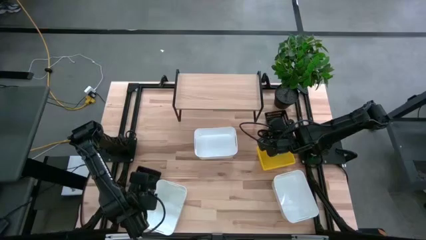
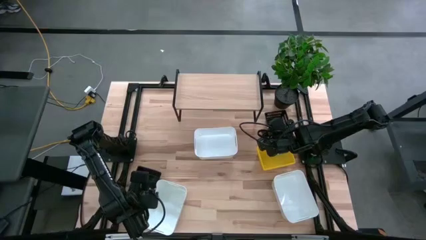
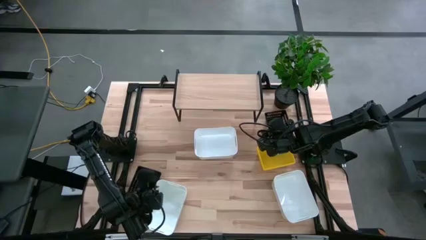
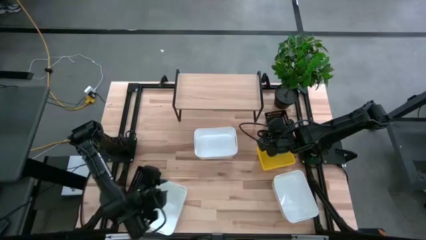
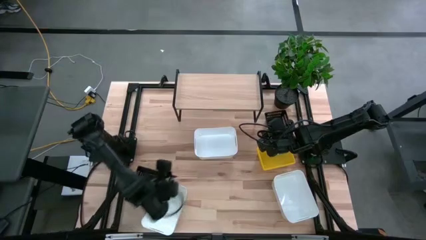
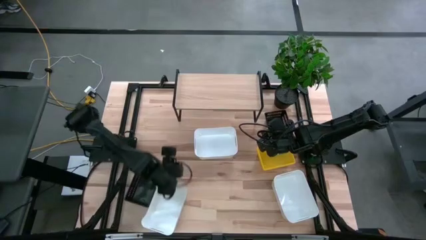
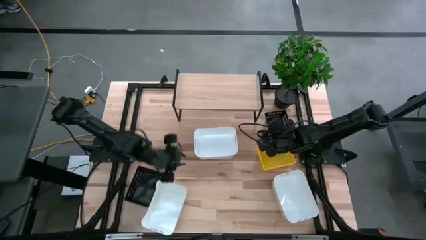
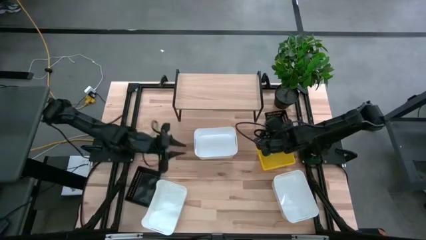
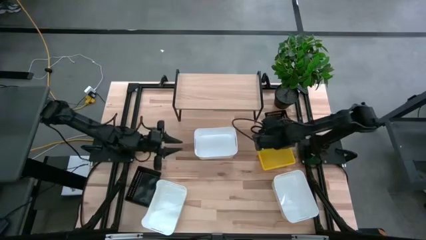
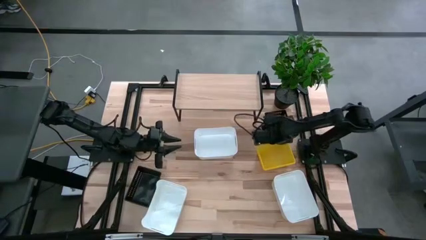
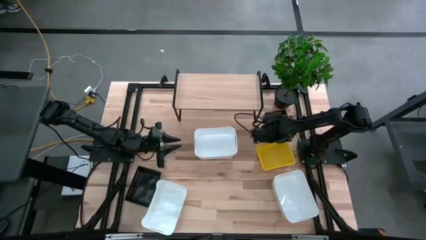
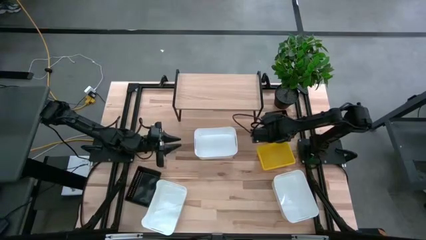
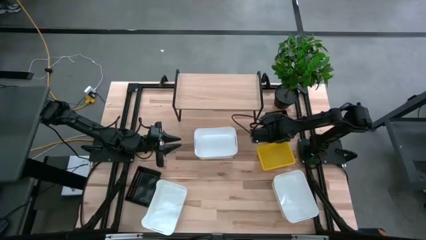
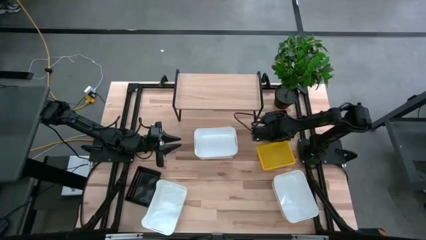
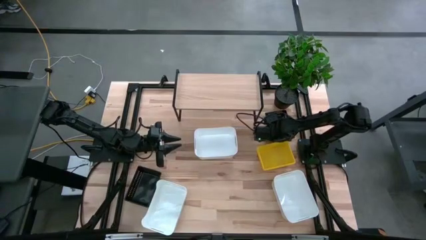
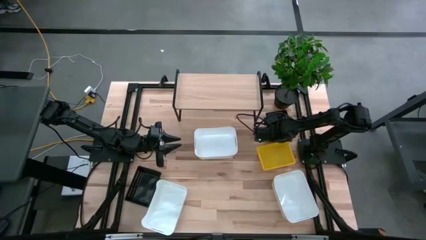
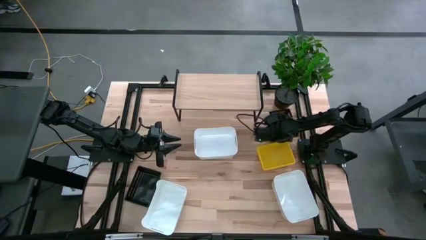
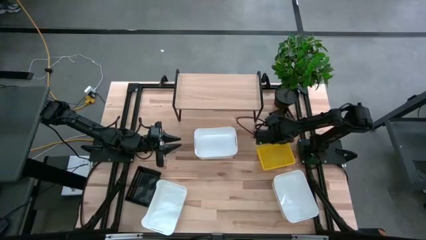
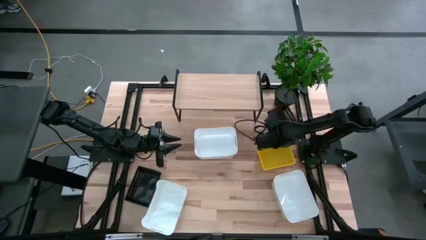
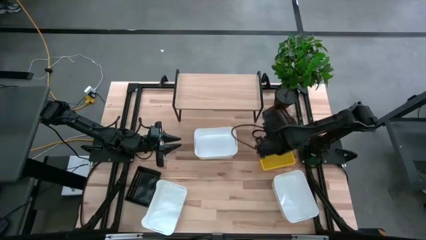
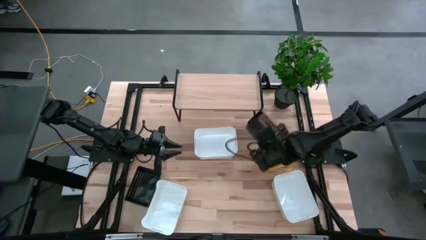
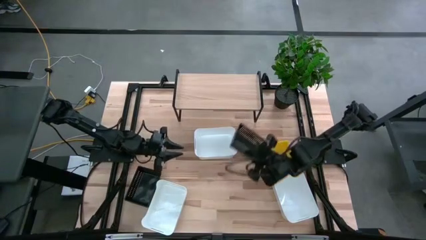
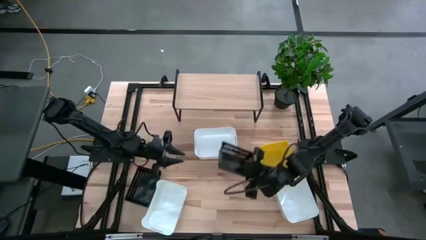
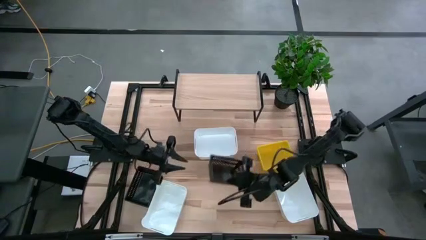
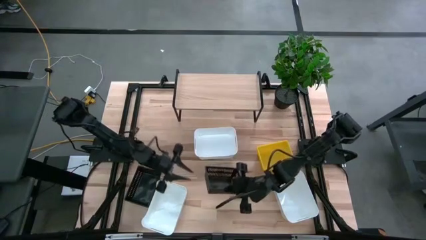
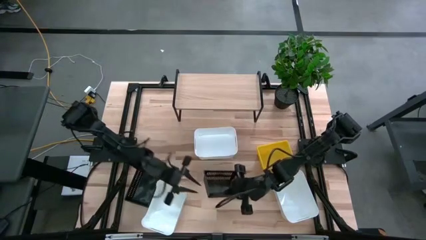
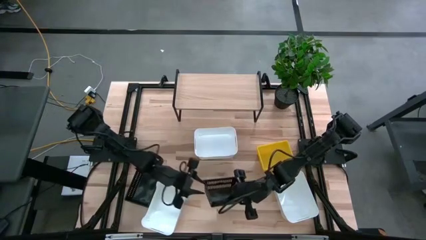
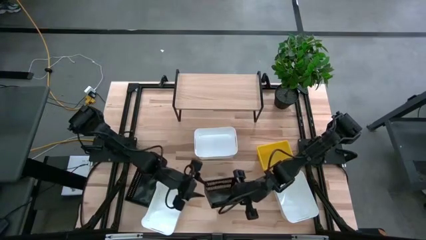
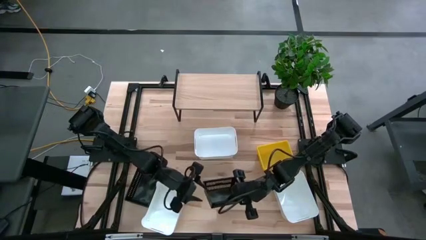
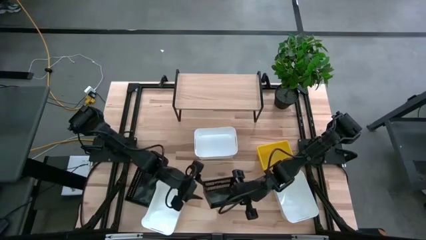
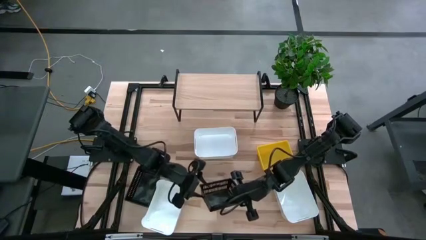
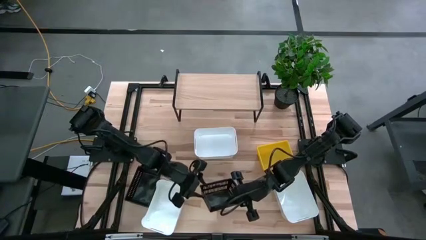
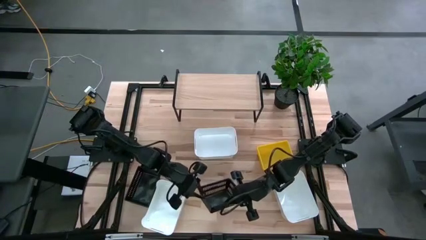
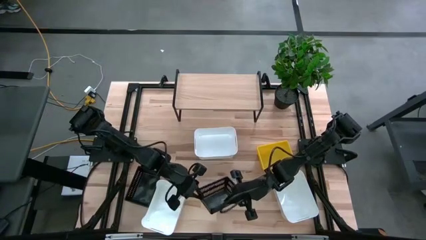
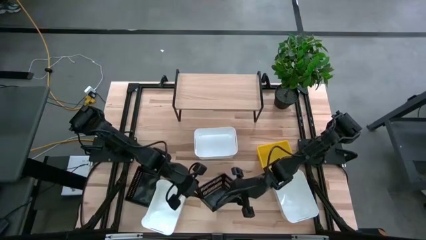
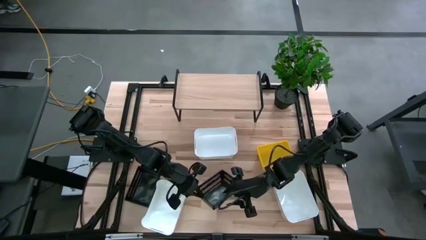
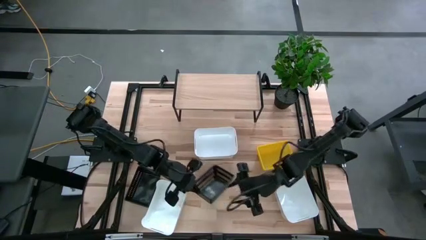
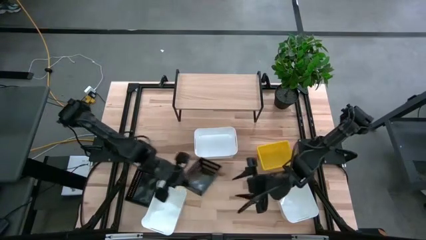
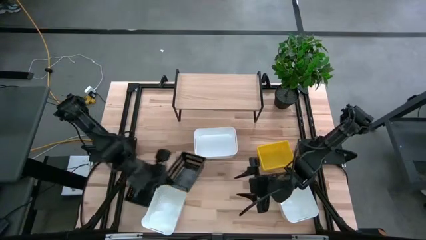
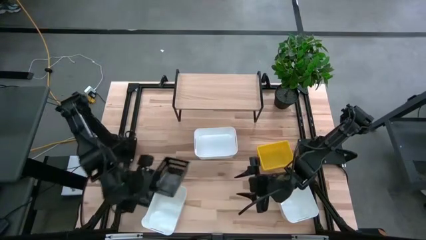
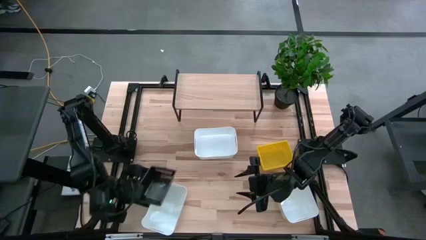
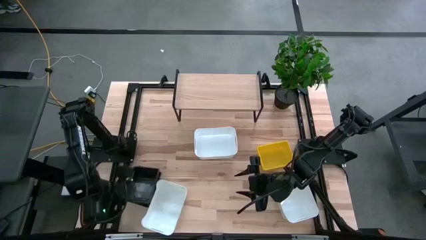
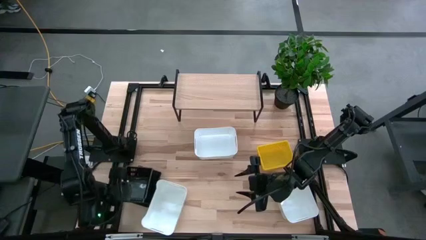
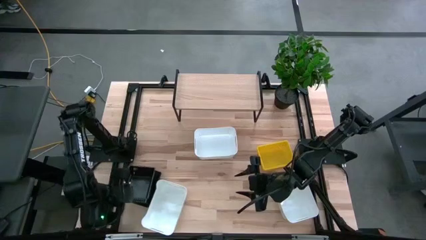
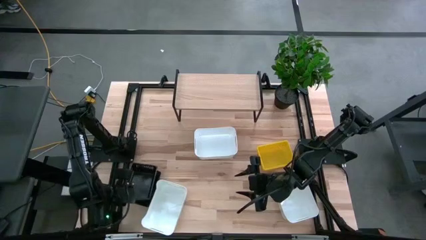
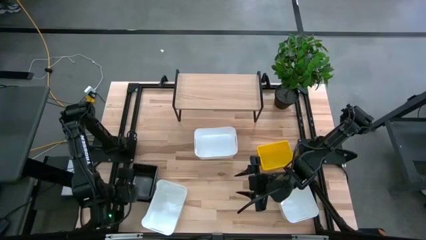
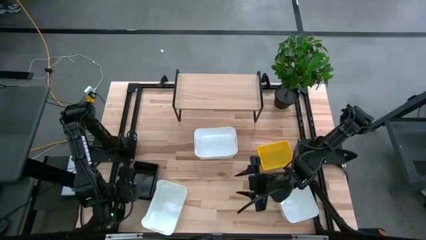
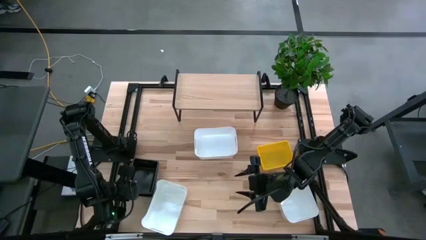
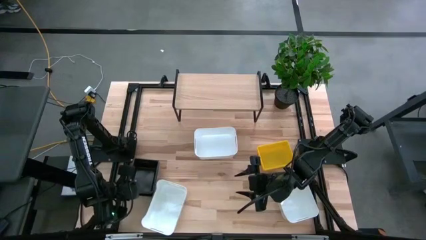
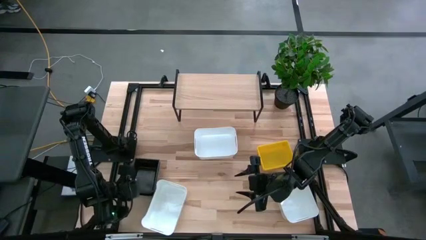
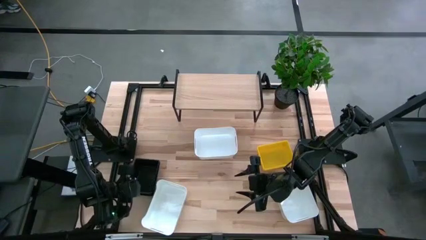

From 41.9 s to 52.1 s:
Task: Stack baskets on shelf by color
Stack the black bin on top of the stacked black bins

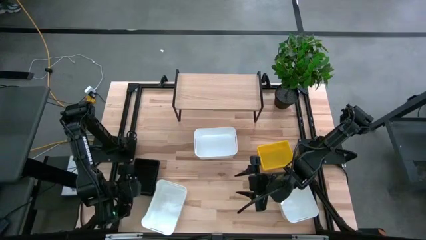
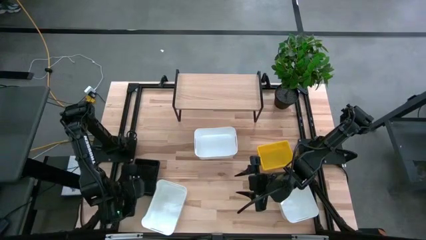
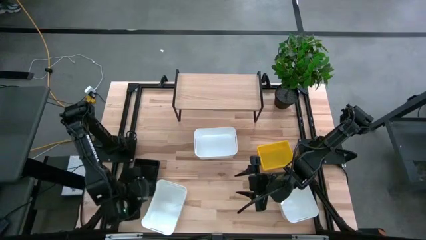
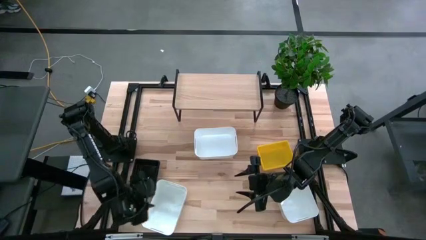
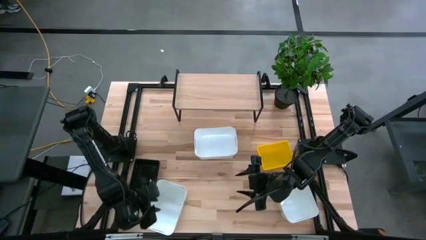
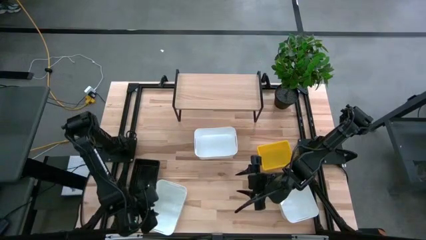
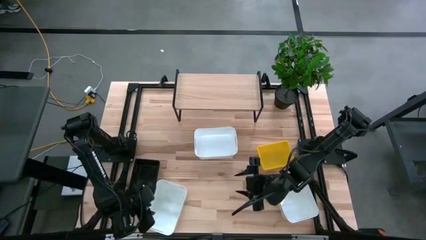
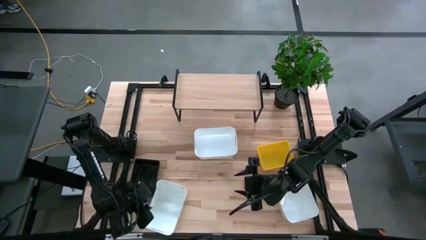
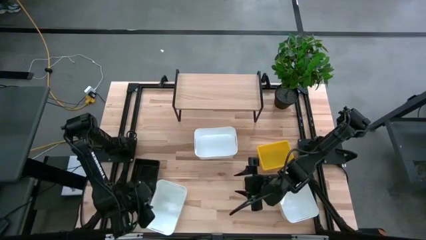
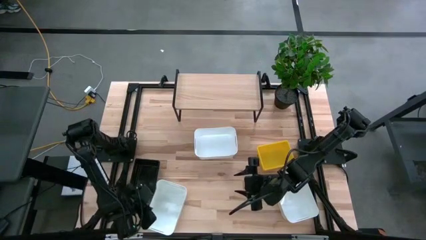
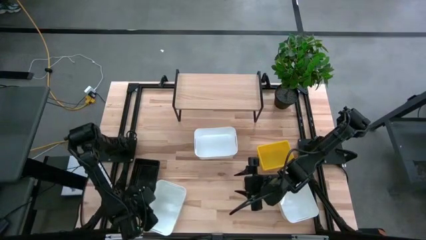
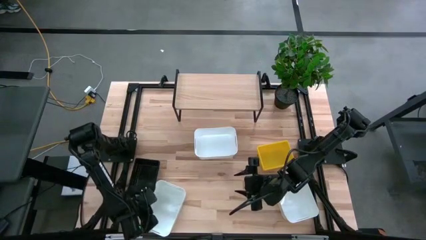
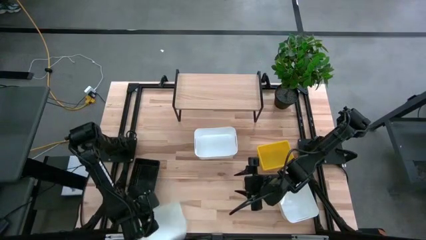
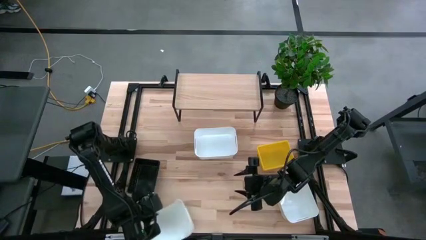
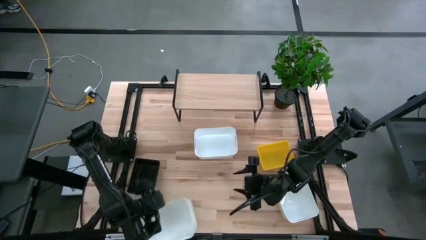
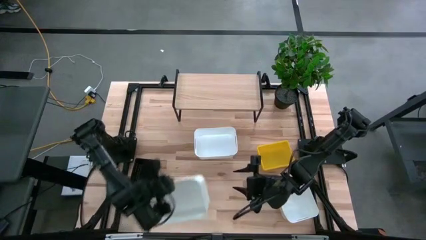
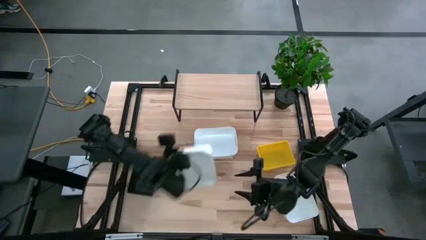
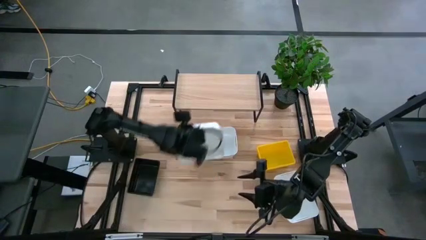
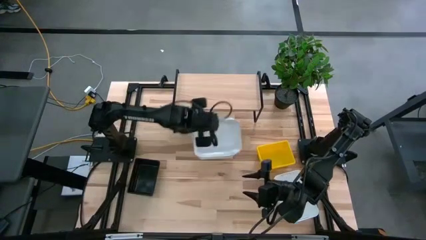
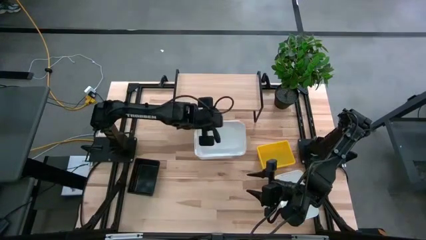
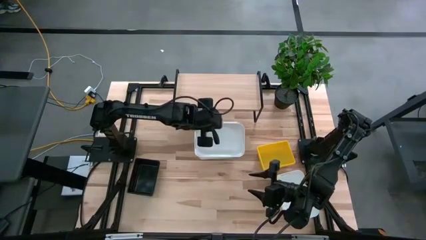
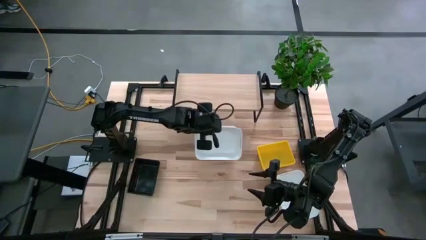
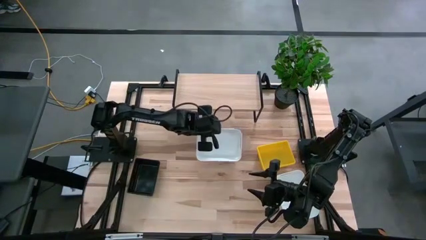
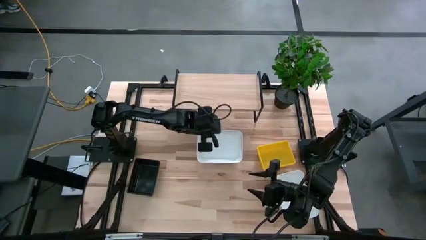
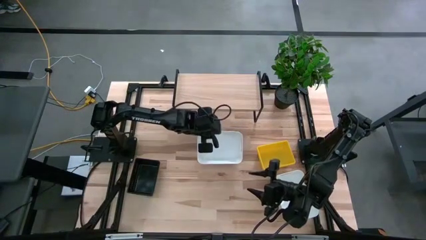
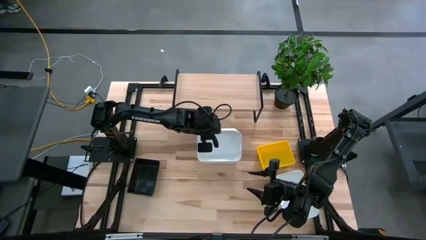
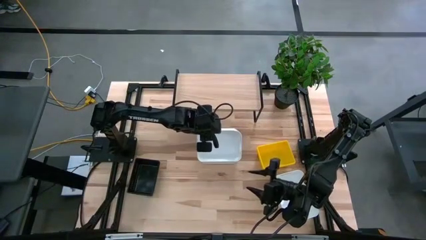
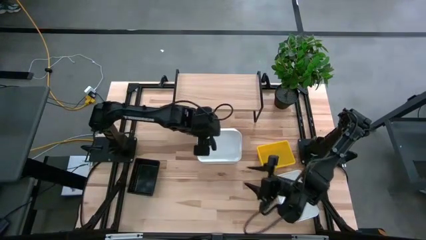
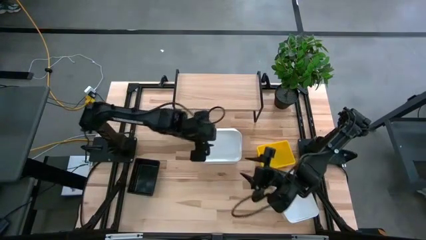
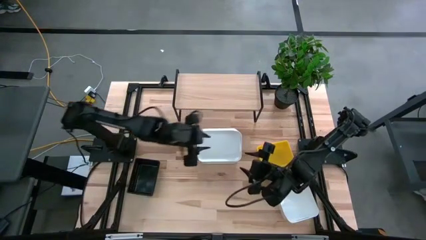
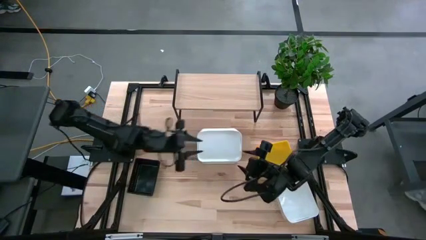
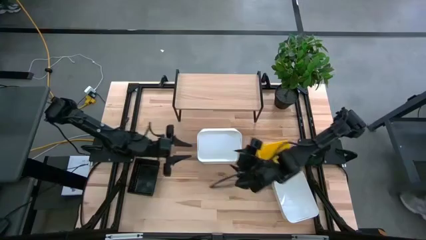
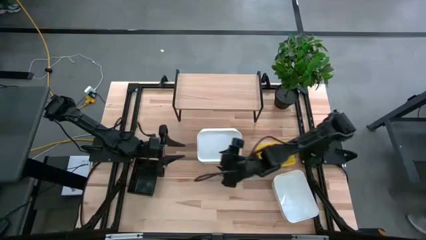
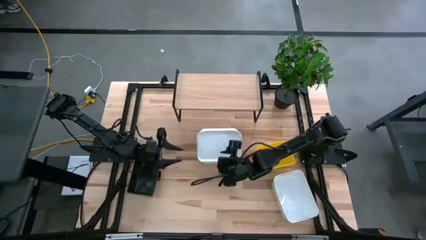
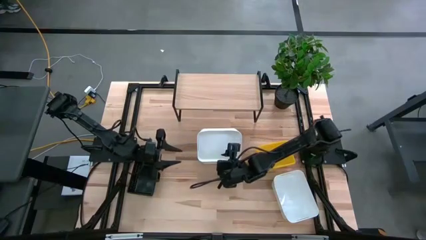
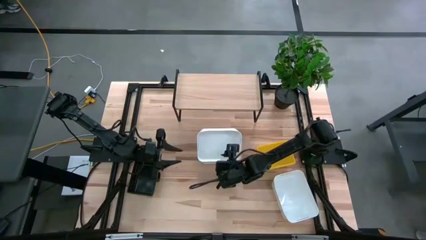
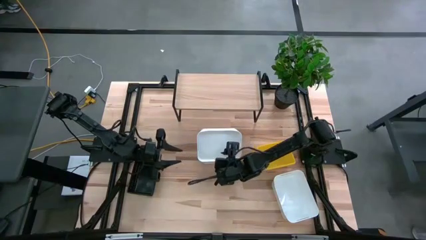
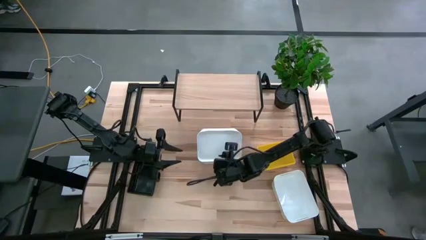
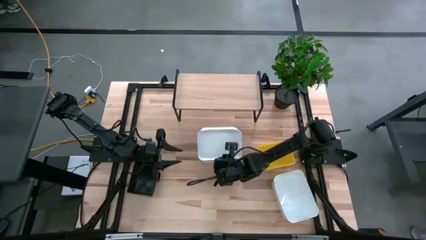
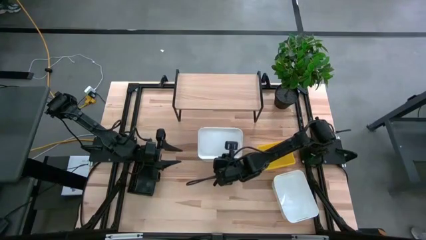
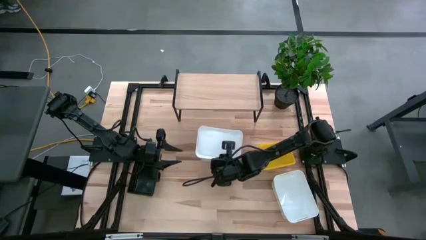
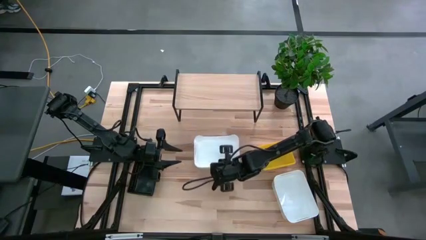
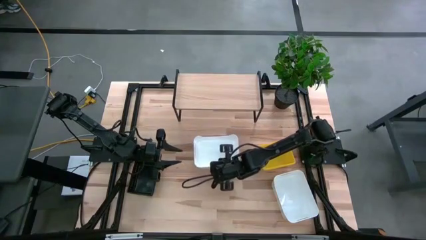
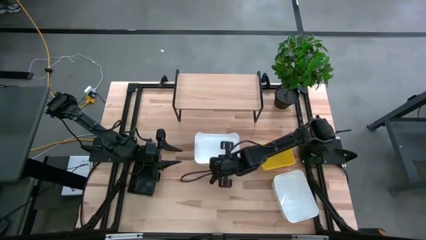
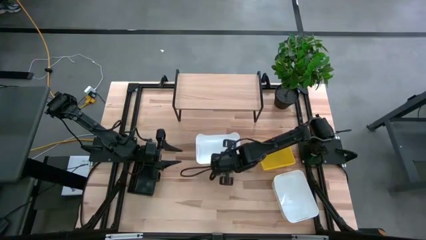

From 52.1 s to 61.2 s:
Stack the bottom left white bin on top of the top white bin
